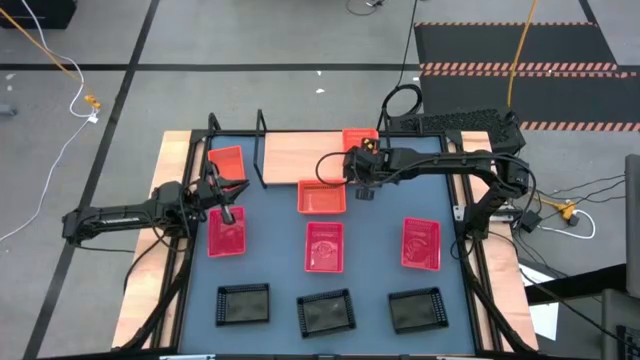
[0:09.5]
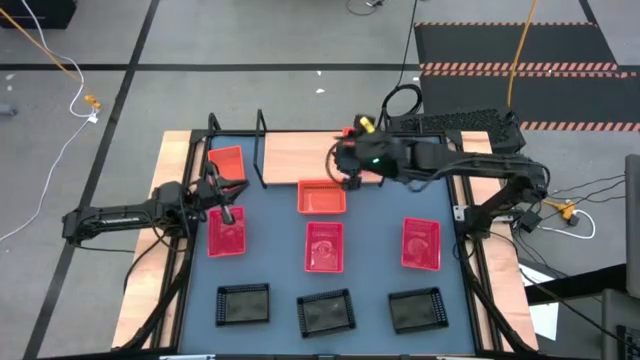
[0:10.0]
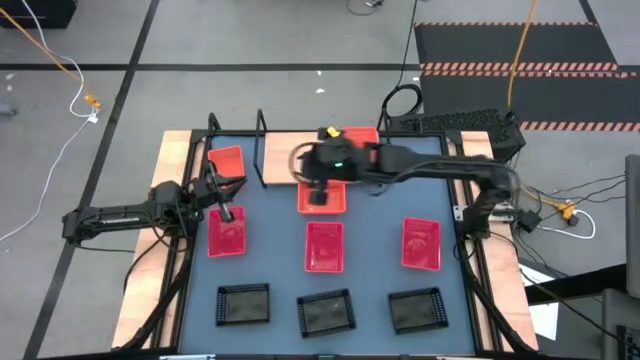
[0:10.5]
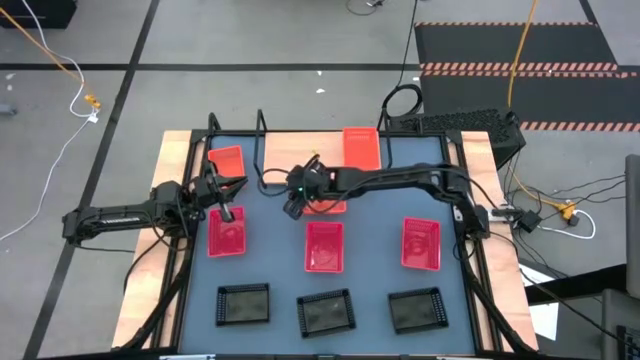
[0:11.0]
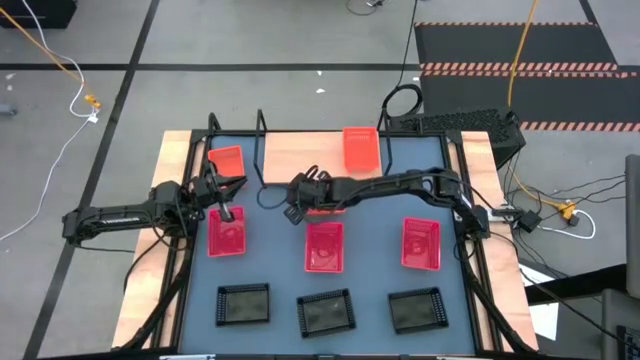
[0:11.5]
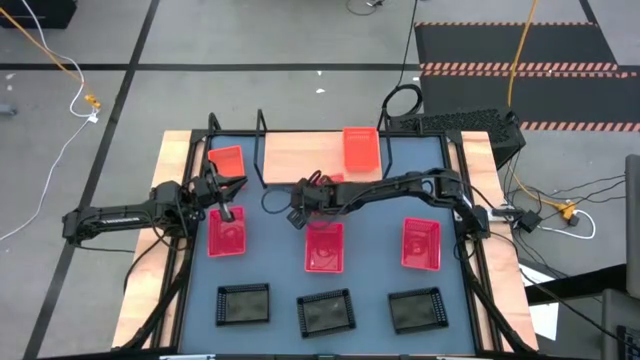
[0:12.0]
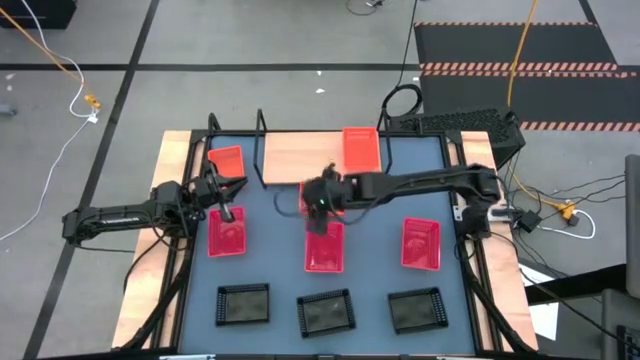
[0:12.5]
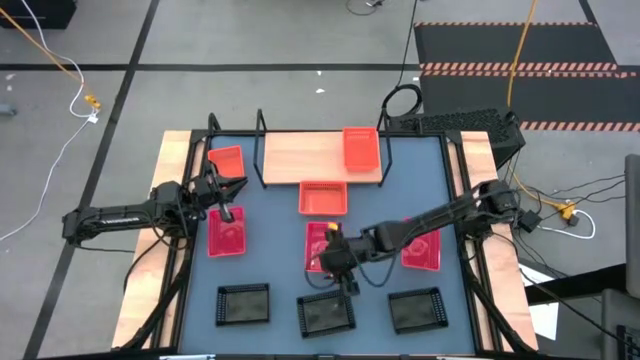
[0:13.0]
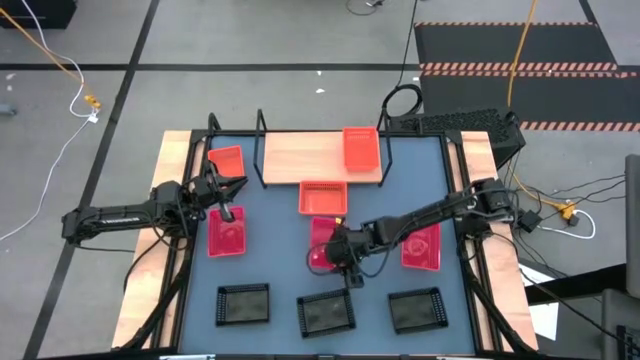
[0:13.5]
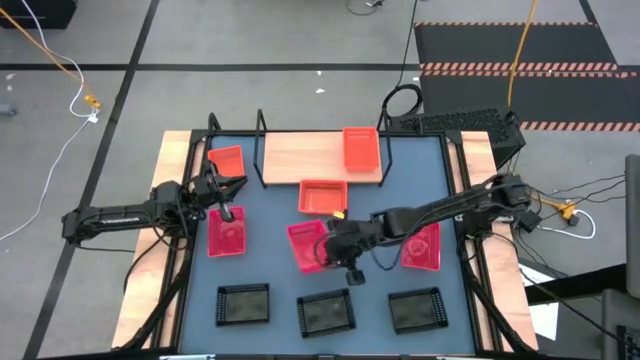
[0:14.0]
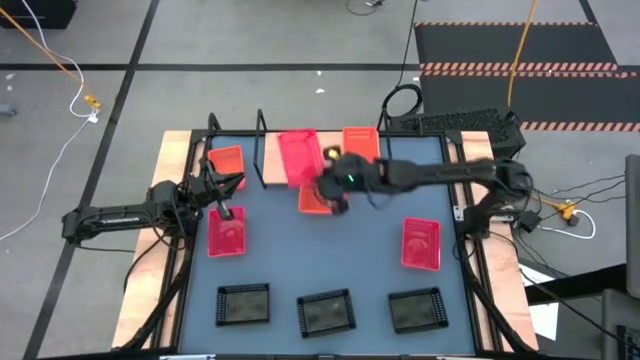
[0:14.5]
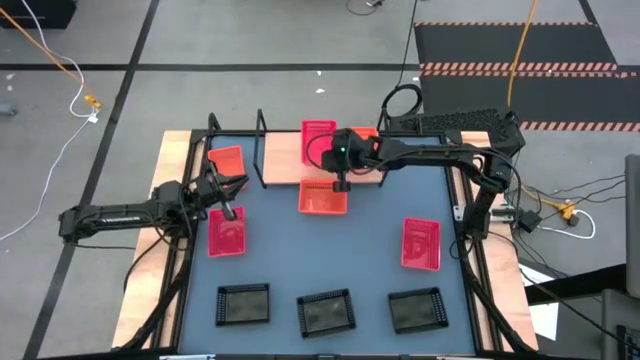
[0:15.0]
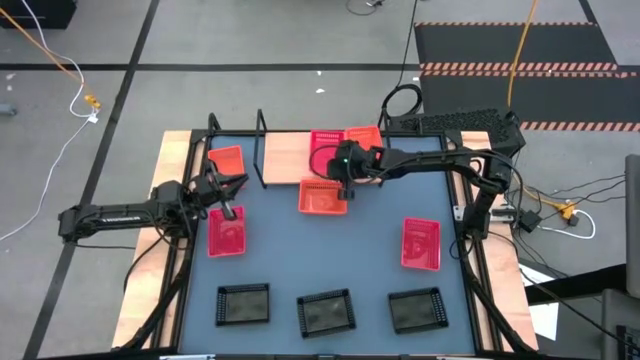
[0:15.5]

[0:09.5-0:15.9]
Task: Stack baskets on shelf by color
Put the middle red bin on the shelf

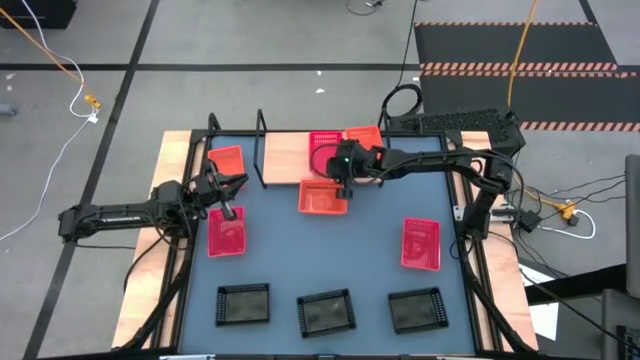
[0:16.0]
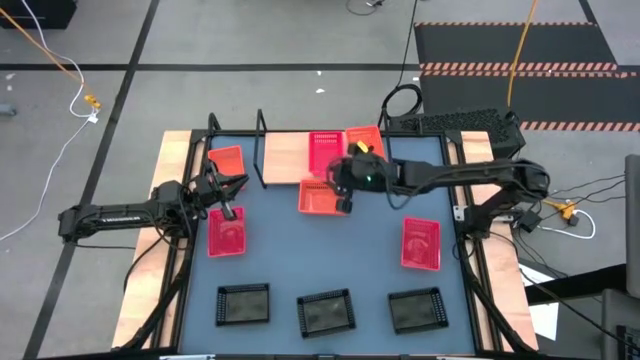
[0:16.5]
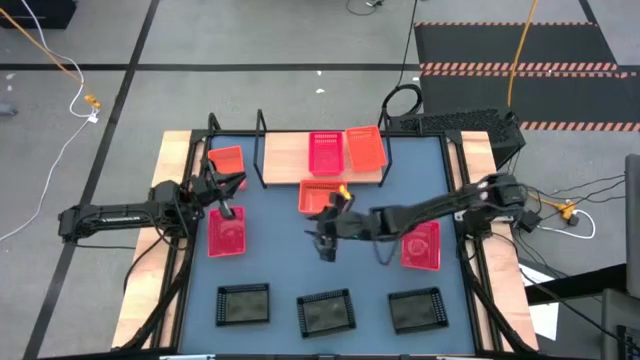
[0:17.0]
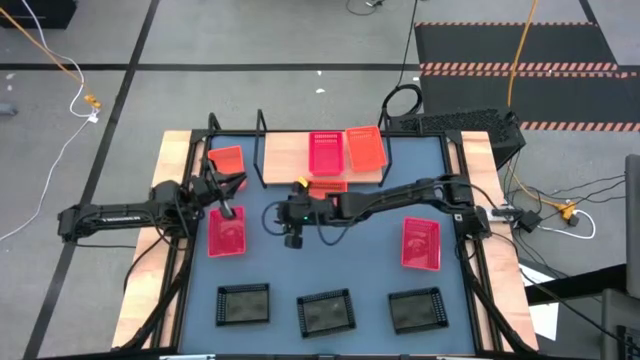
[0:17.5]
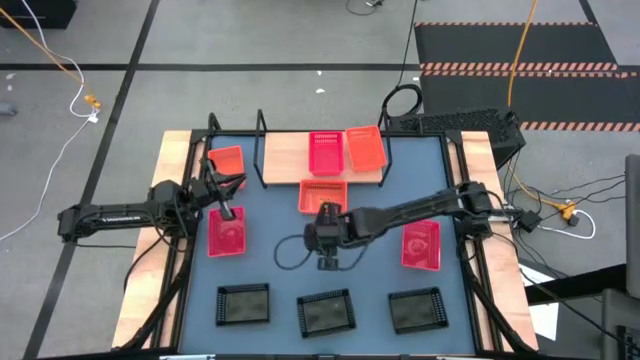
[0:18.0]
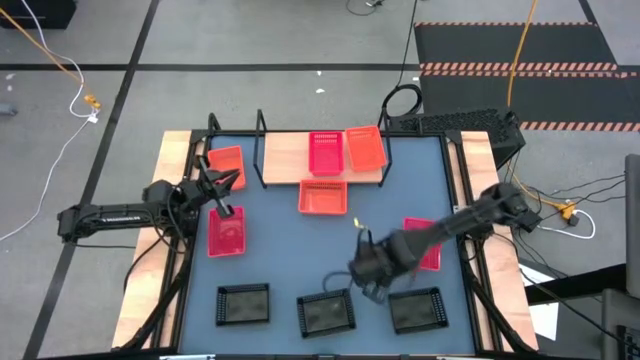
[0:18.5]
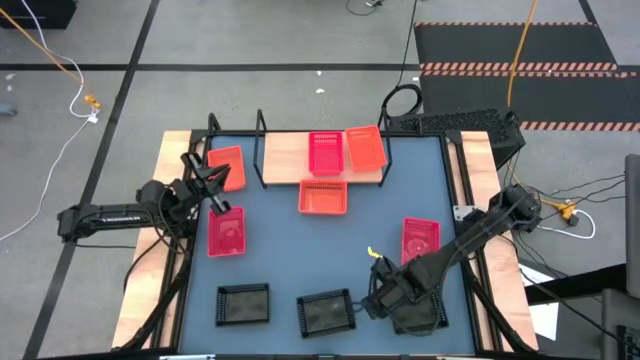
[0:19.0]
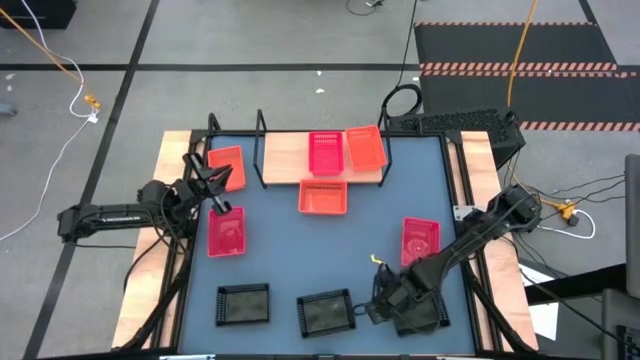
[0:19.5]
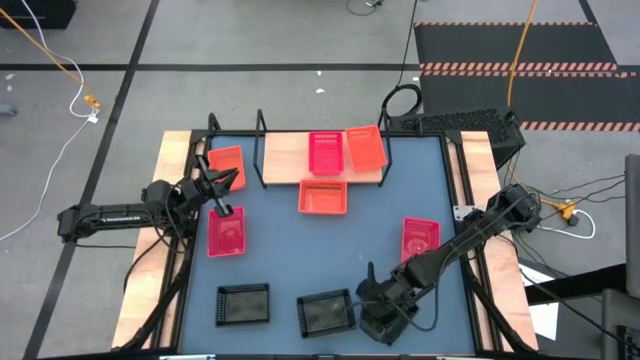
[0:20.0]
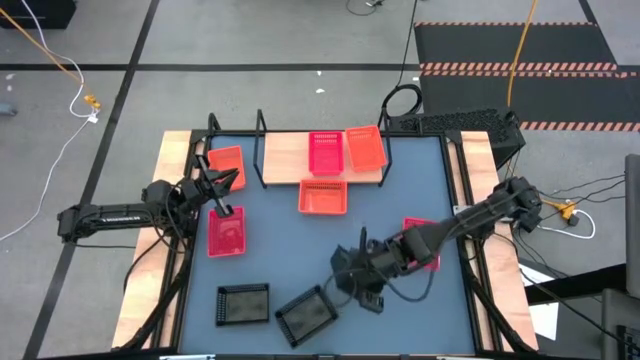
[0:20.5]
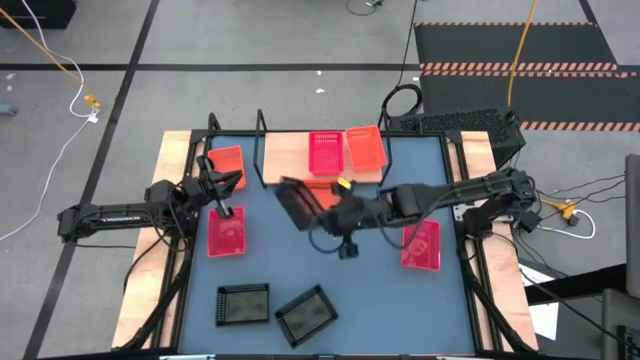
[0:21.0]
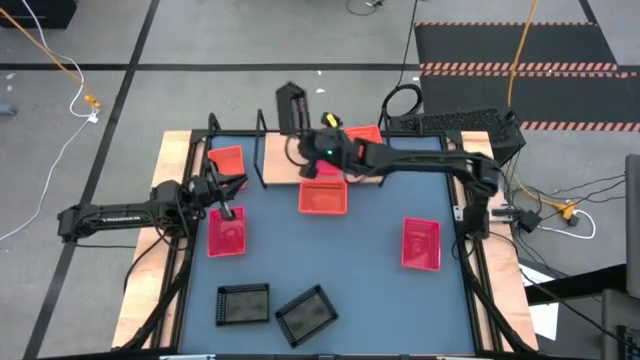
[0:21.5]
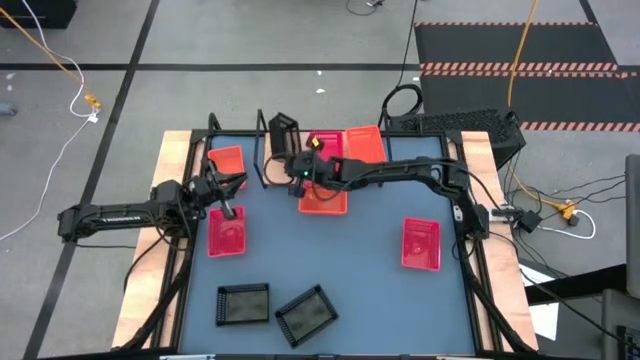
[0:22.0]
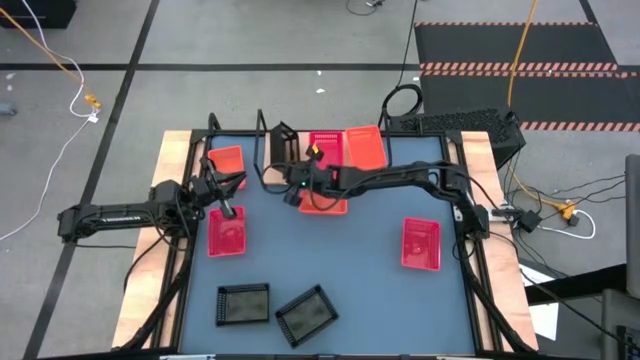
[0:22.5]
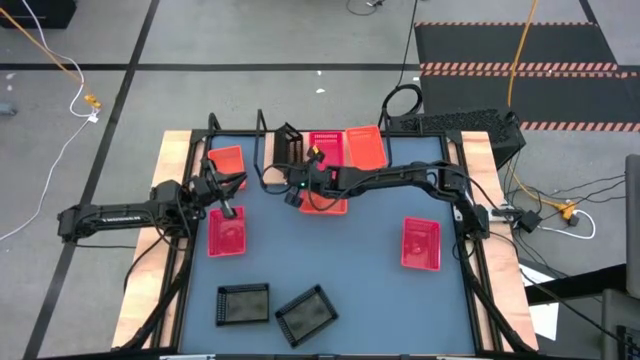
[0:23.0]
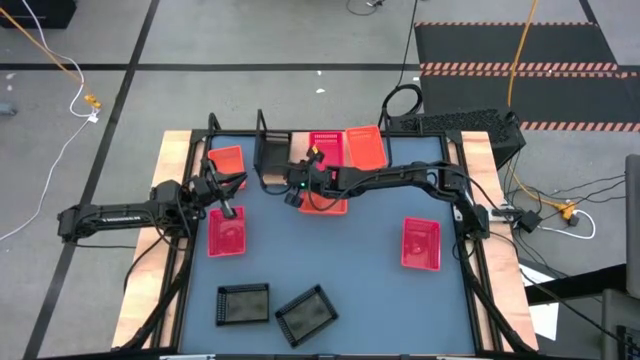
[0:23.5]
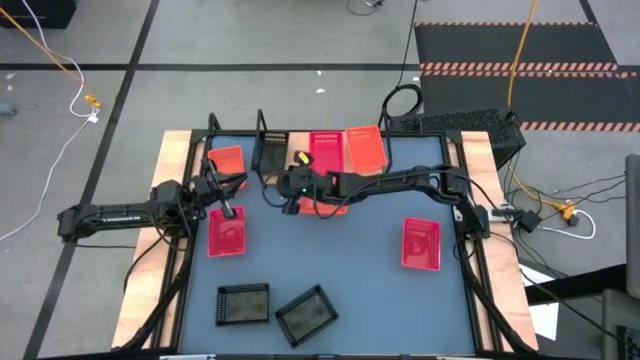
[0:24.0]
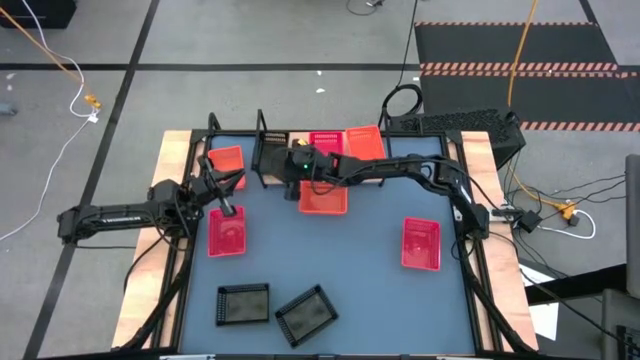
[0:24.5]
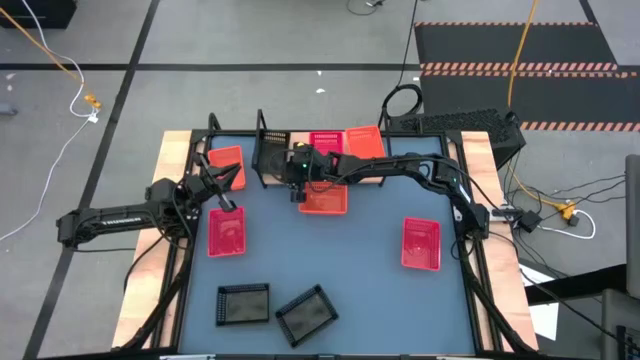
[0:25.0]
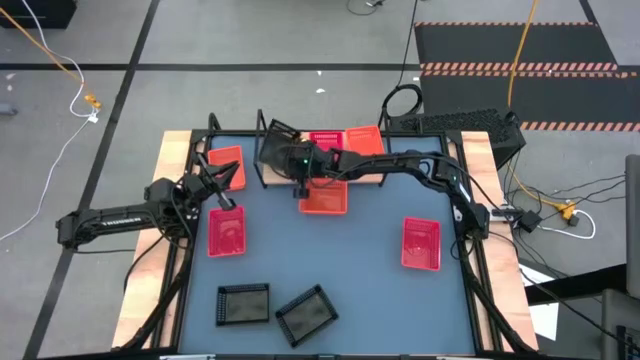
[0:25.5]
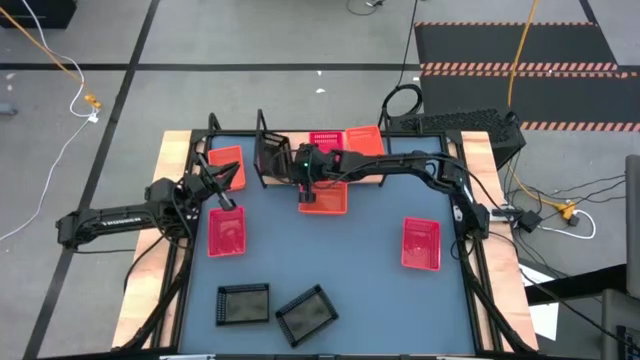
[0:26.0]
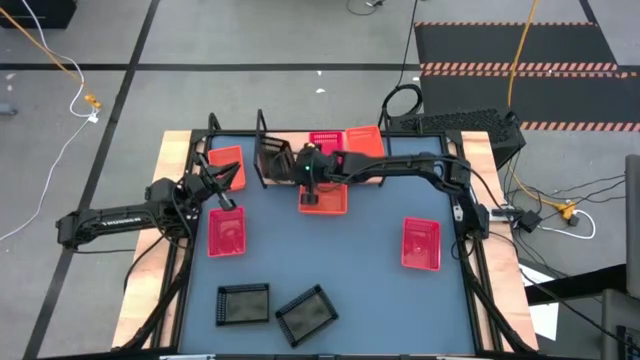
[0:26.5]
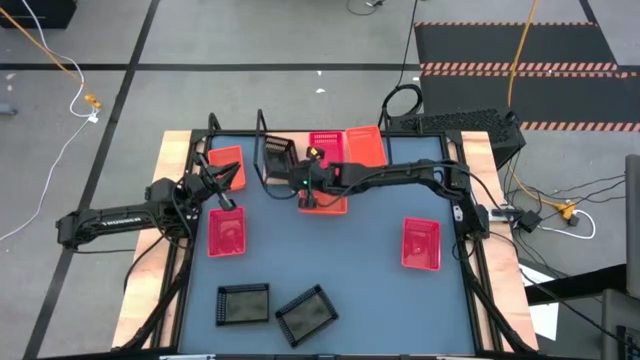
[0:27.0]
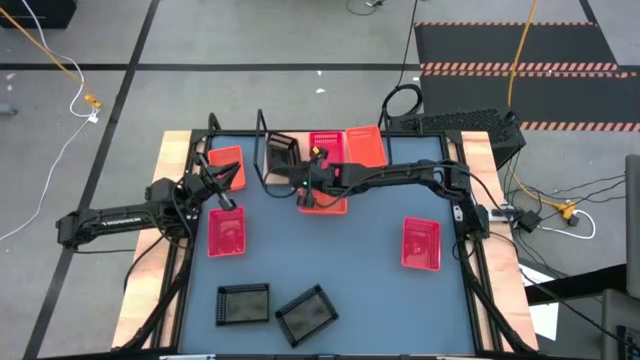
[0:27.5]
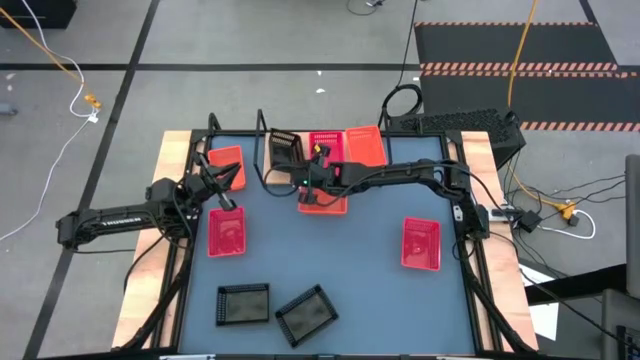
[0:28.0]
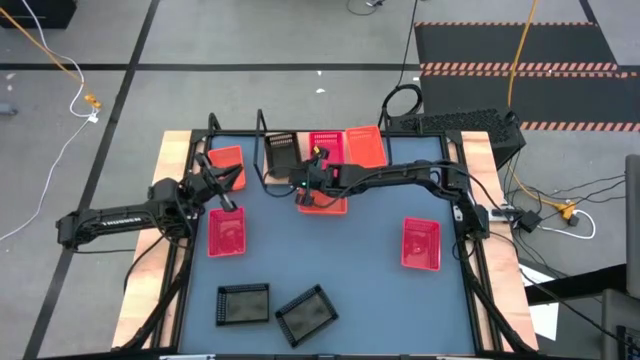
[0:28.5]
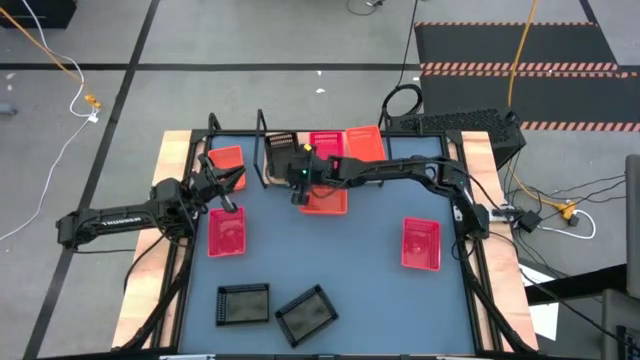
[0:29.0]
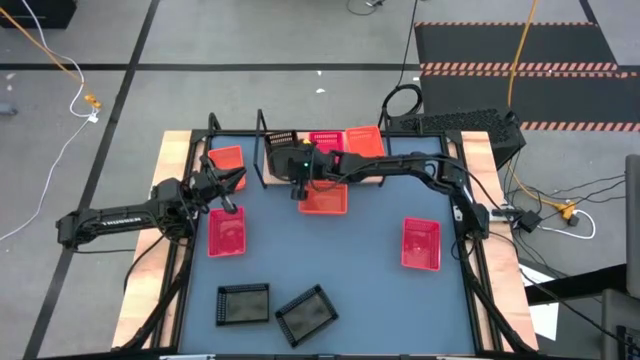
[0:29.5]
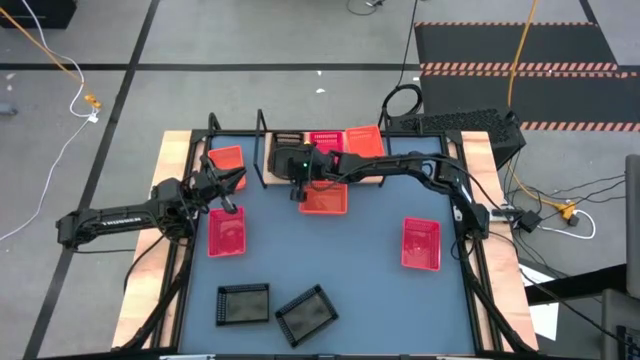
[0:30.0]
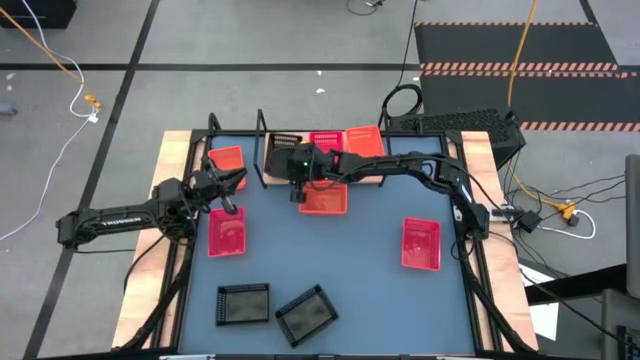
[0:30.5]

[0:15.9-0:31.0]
Put the right black bin on the shelf
